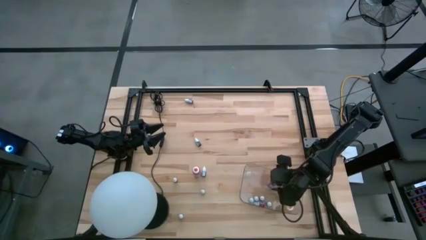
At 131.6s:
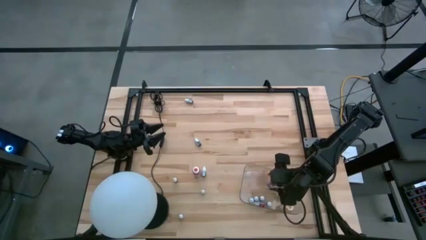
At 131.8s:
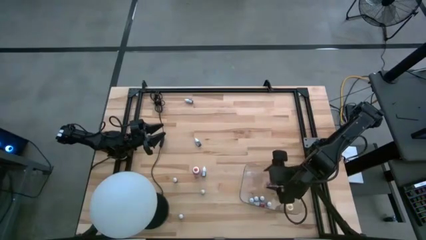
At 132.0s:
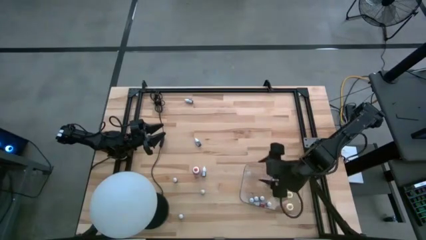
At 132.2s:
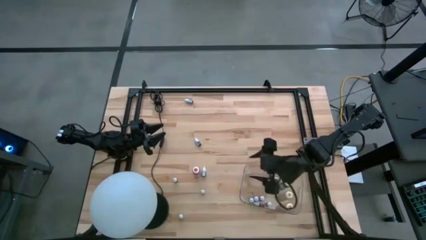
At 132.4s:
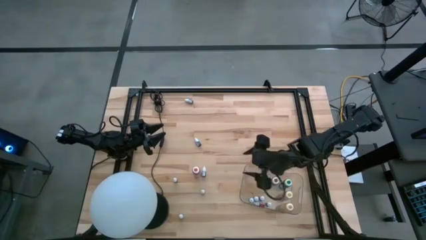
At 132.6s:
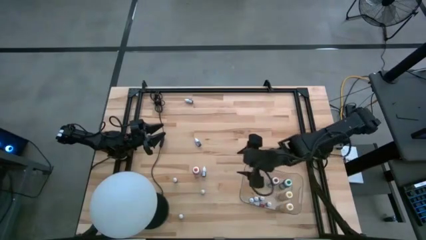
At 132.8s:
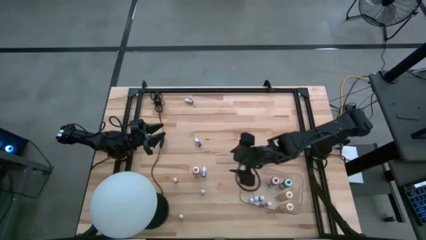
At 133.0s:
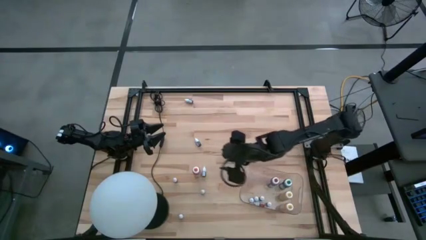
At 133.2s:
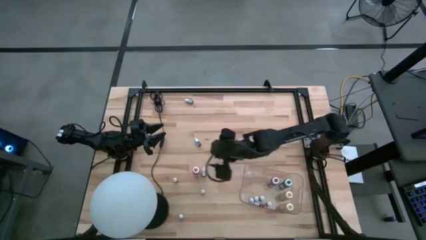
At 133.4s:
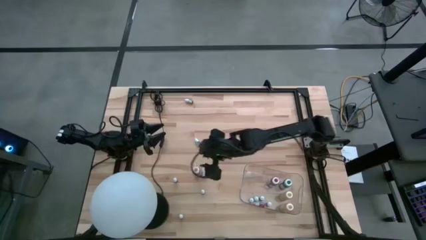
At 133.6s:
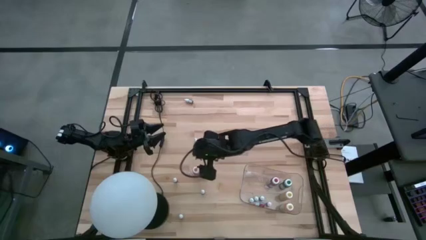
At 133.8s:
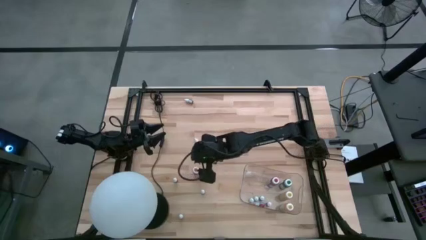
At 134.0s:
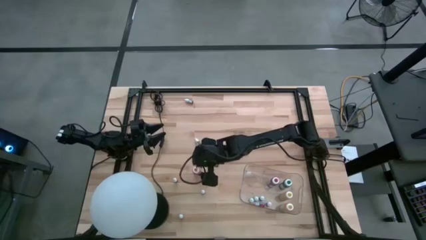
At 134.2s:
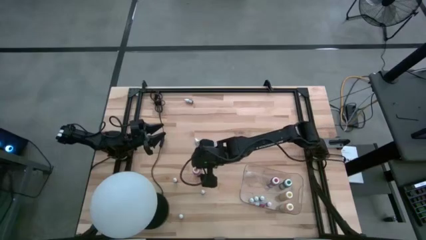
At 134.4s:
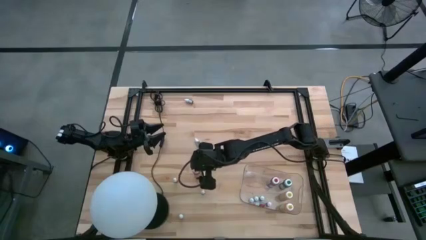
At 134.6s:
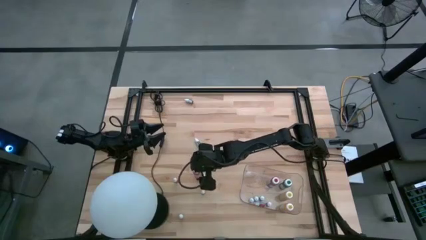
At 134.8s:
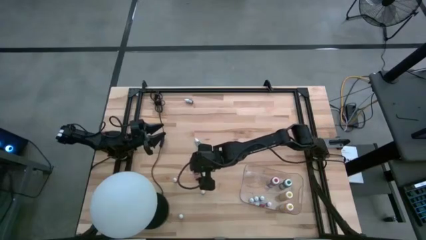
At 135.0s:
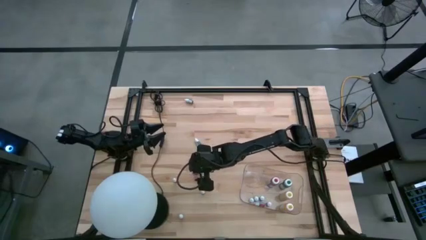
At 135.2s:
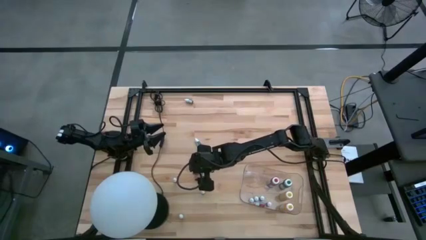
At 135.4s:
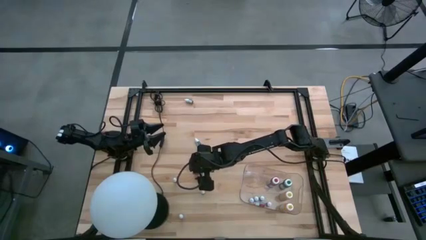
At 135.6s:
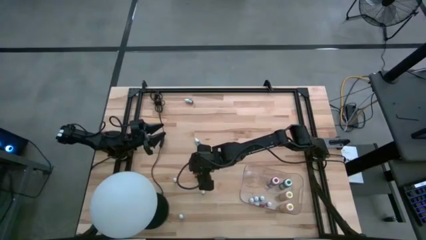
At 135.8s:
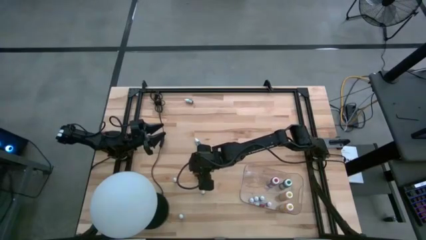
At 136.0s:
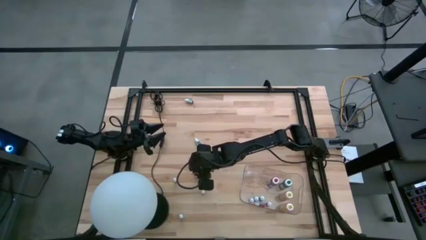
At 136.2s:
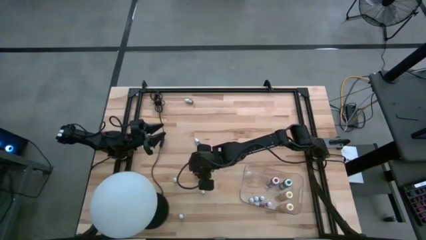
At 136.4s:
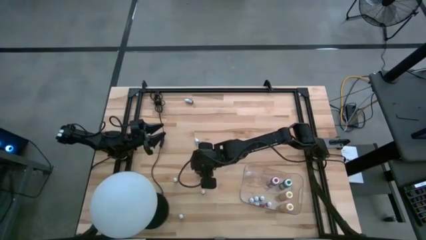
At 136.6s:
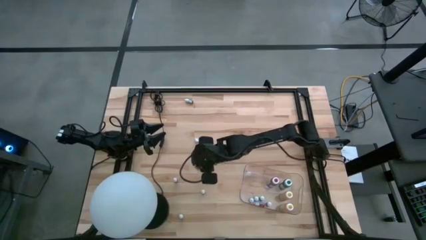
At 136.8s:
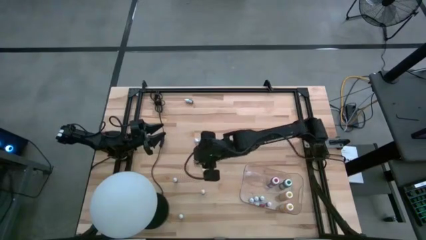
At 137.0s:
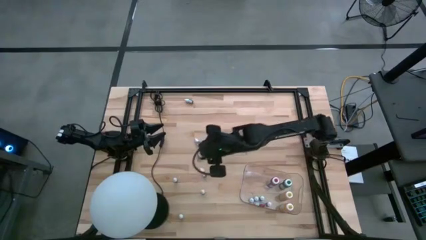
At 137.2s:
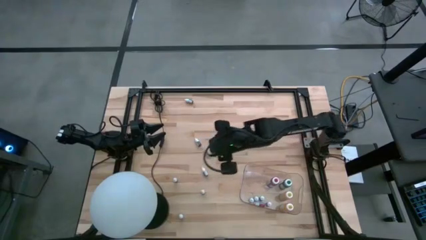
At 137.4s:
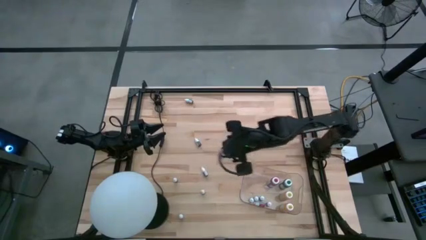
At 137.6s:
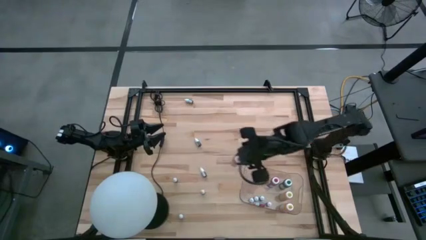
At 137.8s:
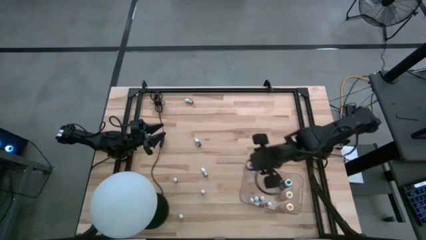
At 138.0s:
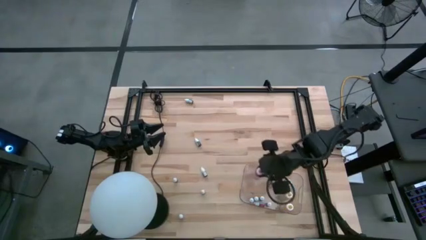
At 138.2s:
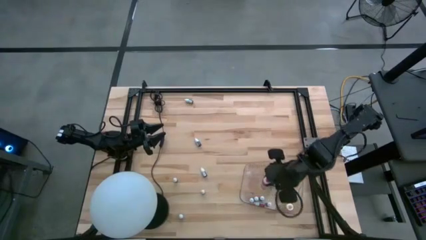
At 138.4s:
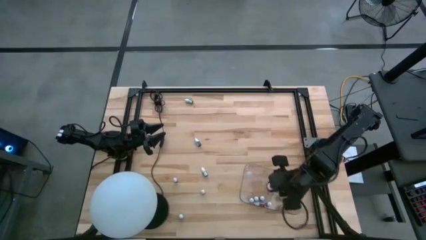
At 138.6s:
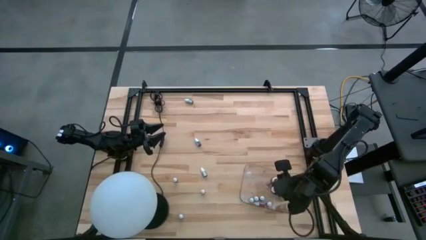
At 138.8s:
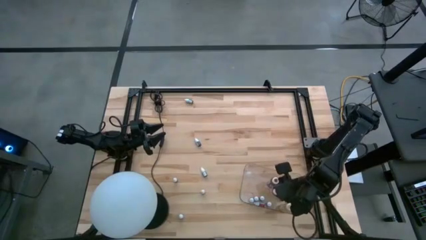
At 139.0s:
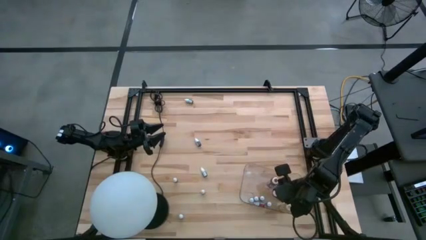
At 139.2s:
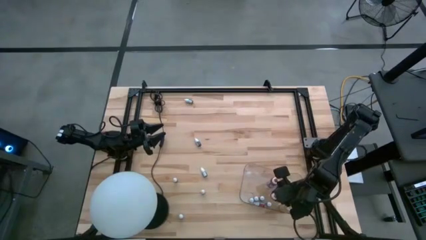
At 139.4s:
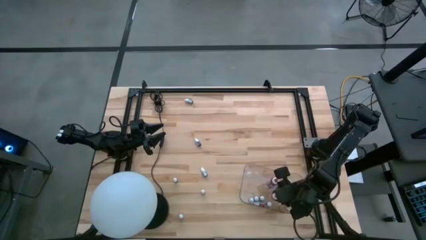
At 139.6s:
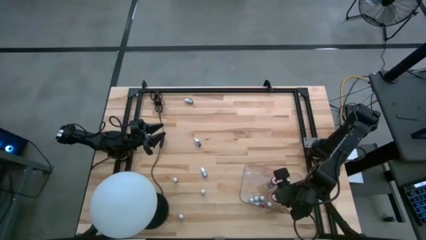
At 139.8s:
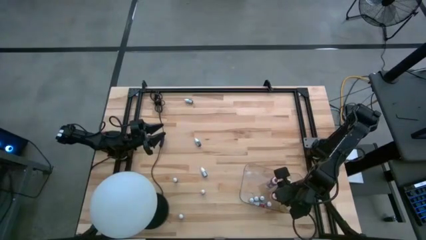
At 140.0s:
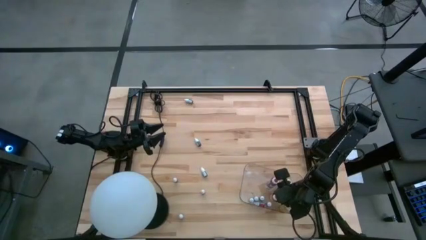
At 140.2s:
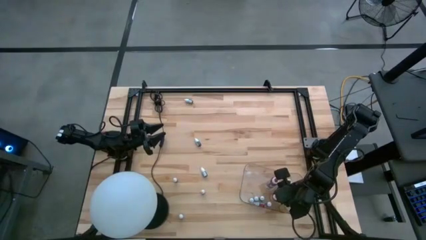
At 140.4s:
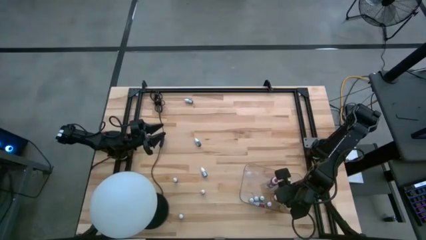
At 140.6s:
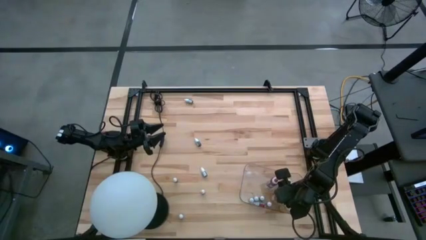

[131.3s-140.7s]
Task: Pick & Place food coloring
Put the orange food color into the transparent bin

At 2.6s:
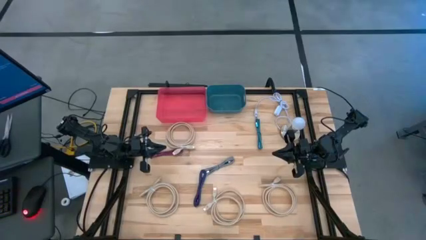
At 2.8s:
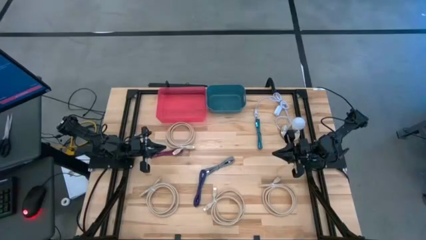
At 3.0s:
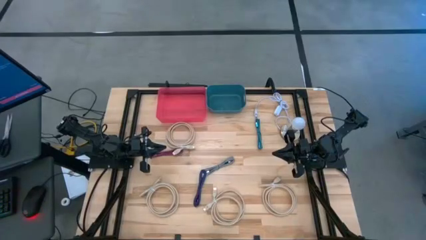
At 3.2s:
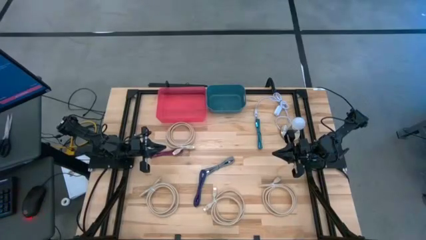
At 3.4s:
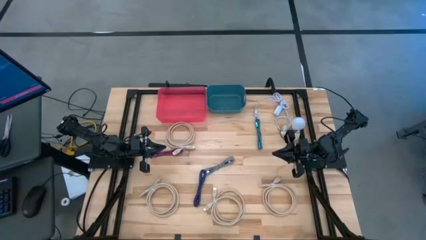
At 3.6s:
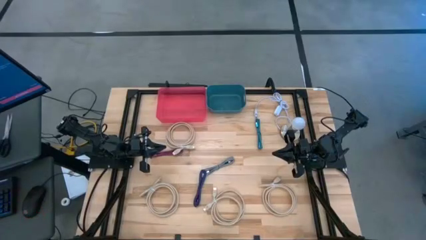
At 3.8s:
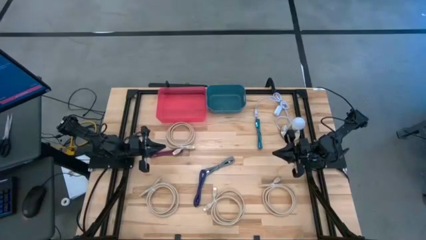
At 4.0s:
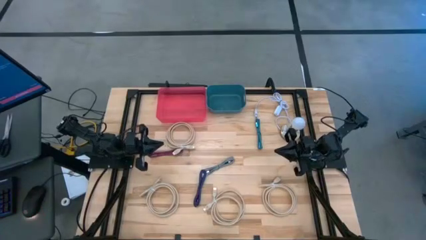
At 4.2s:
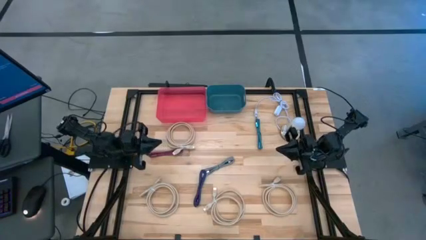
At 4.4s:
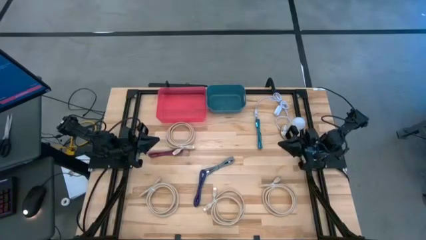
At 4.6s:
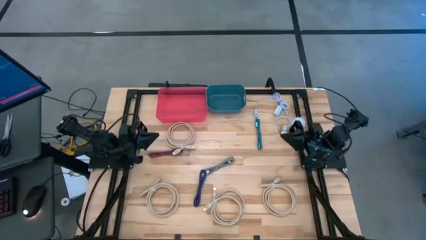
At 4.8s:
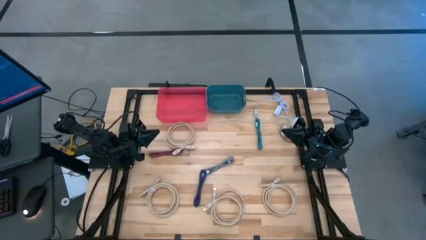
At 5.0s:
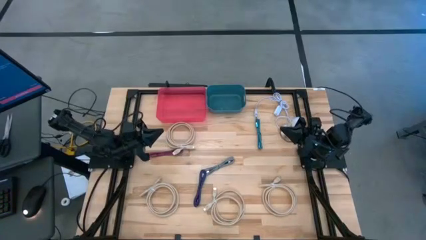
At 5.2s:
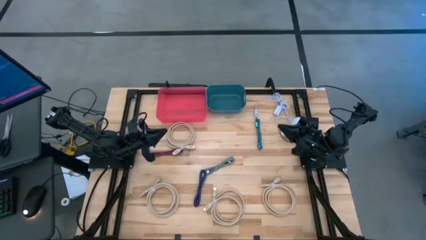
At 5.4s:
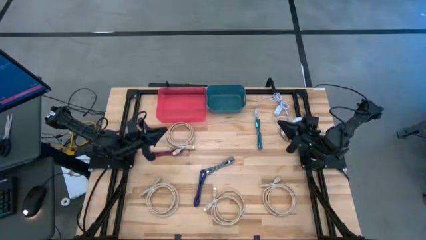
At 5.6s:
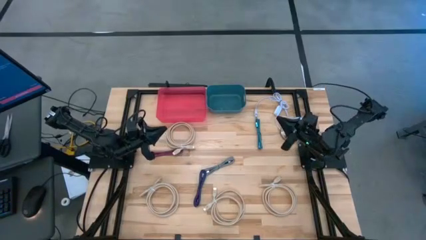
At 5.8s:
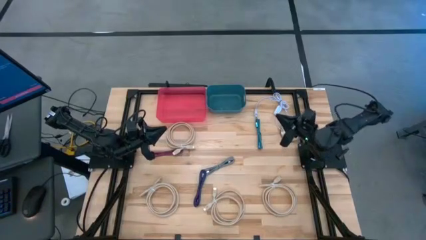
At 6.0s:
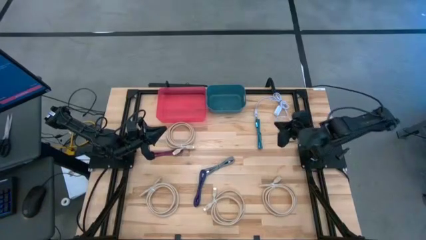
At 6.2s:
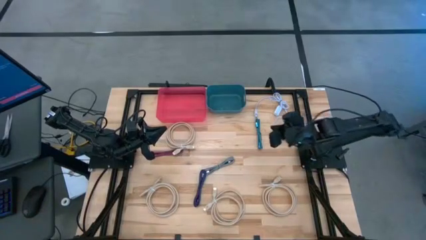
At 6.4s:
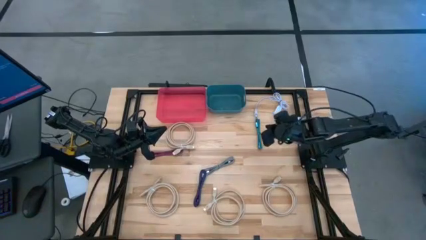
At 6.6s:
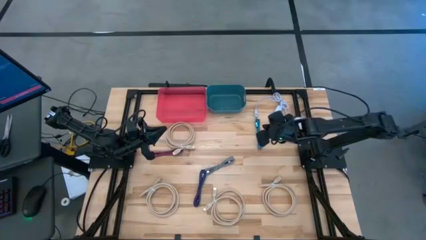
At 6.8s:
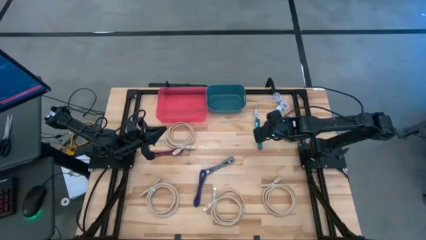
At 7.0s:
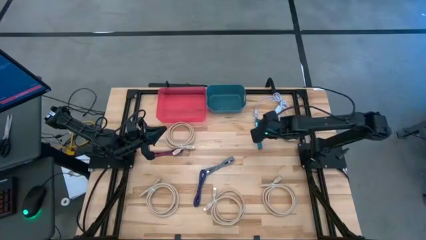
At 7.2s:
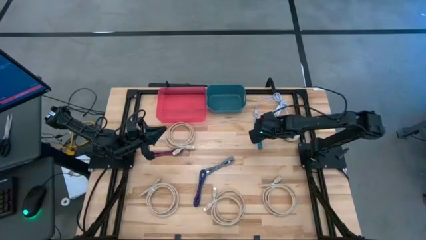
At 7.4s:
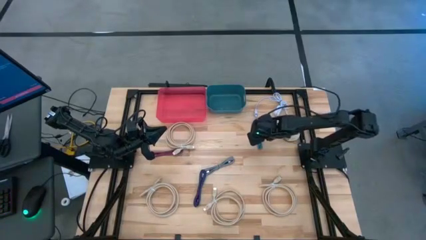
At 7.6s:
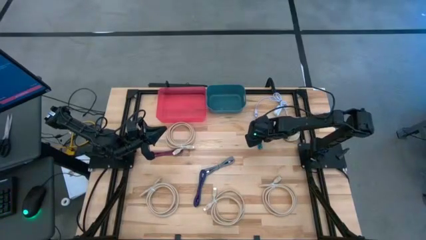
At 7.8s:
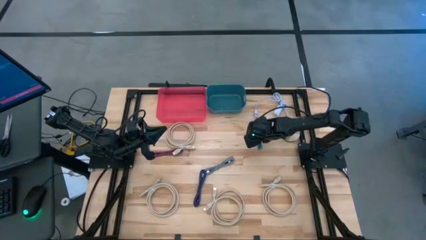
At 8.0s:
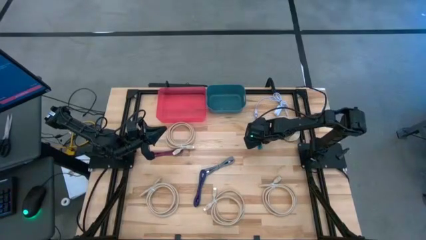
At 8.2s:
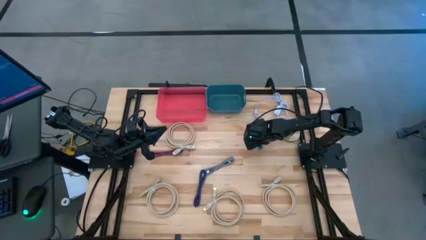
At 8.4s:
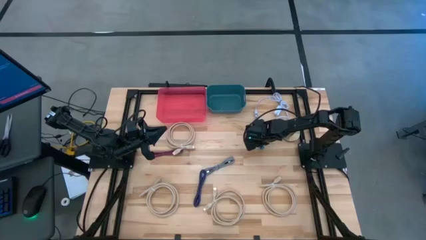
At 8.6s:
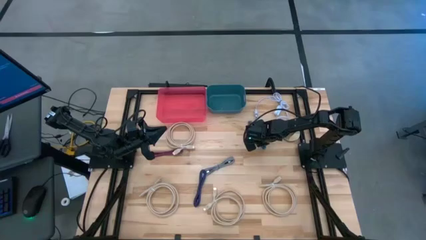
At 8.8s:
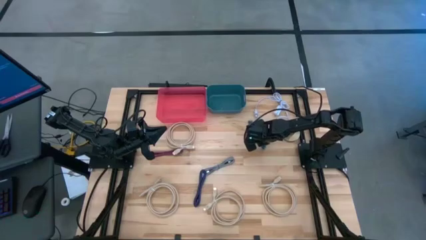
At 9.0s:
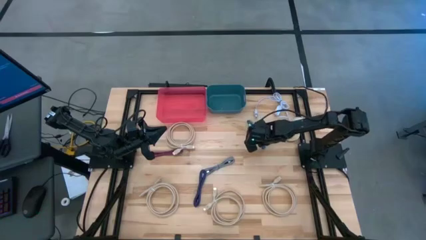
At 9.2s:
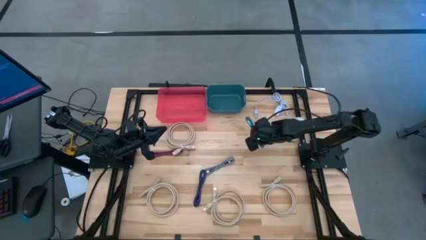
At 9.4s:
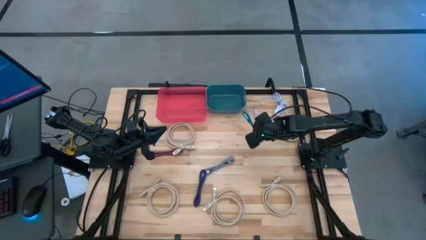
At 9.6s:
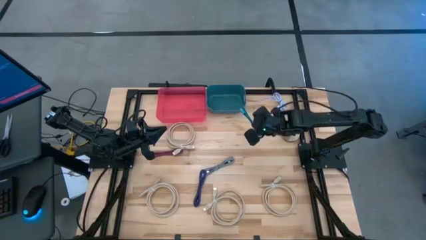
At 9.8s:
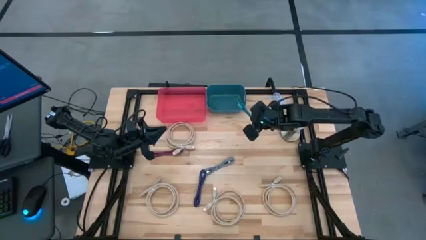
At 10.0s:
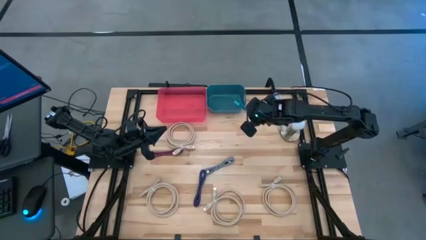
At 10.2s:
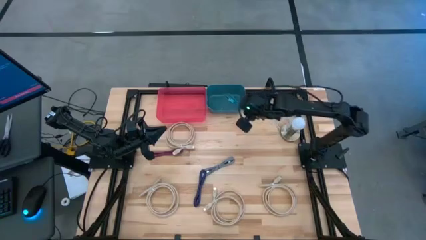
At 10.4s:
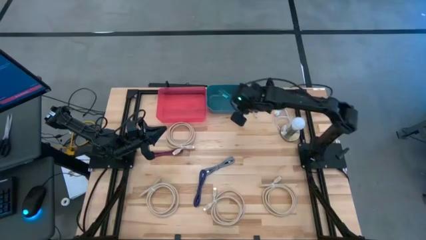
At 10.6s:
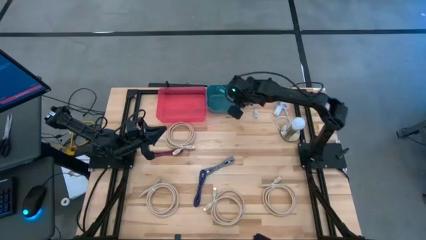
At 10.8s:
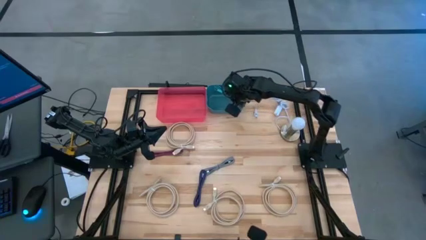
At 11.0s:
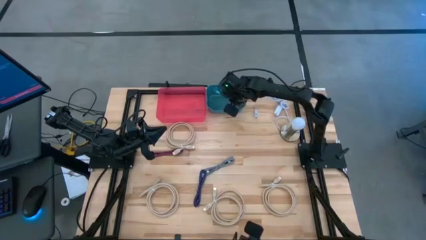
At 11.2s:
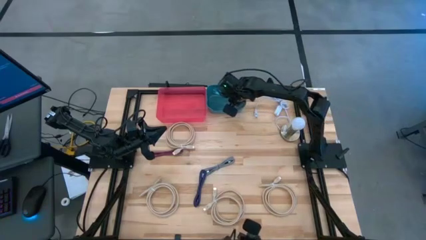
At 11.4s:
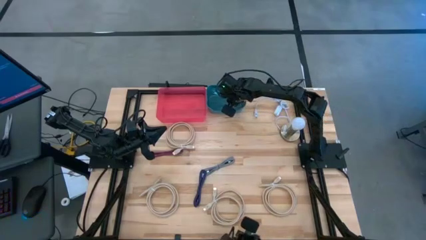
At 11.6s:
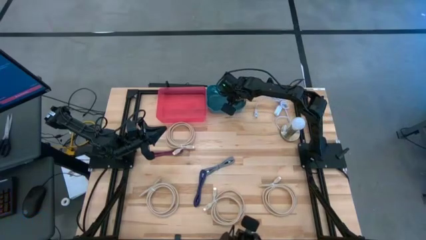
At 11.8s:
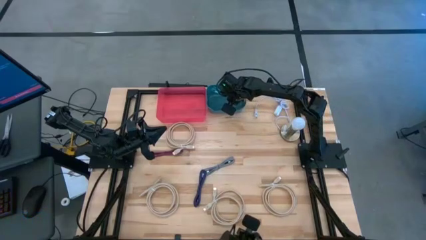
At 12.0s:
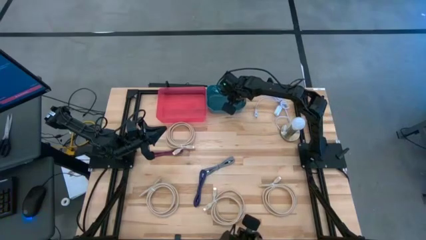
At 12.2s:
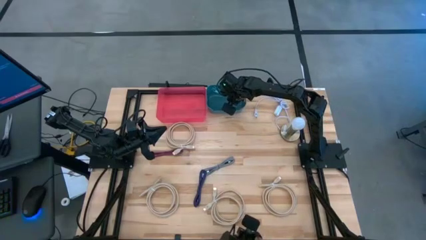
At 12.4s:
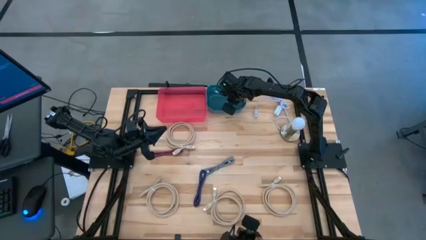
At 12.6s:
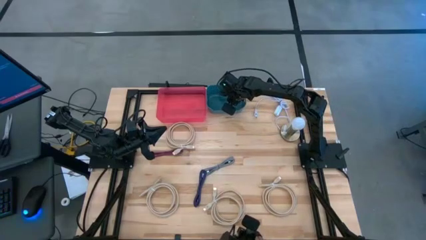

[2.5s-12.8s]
Task: Pick & Place USB Port
Put the black blue charger cable into the blue bin
